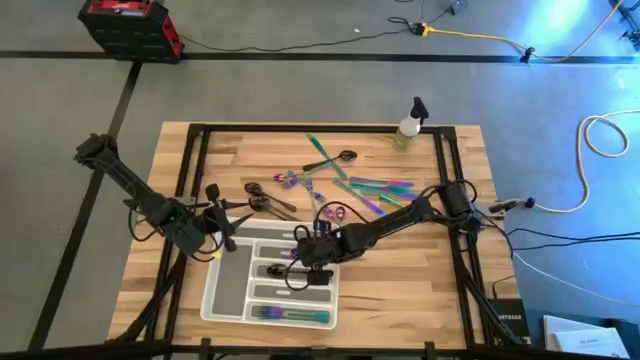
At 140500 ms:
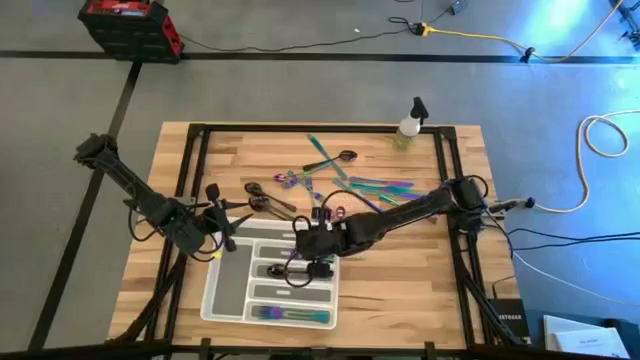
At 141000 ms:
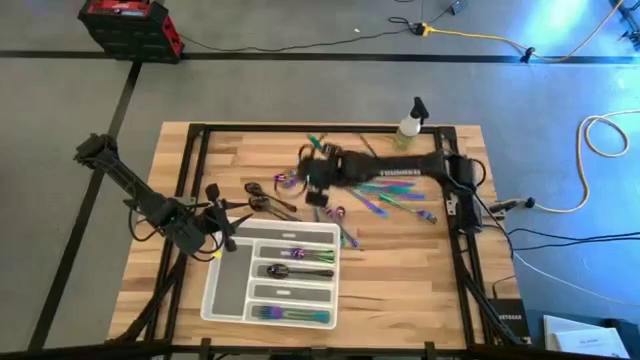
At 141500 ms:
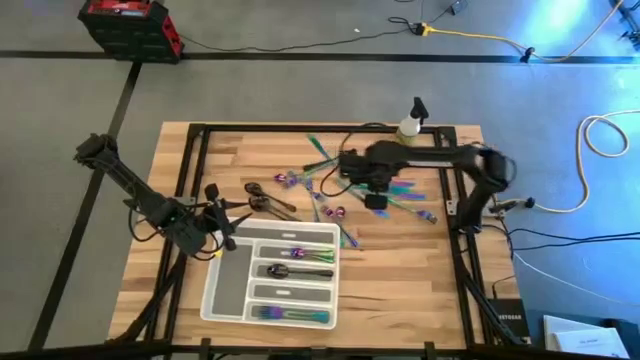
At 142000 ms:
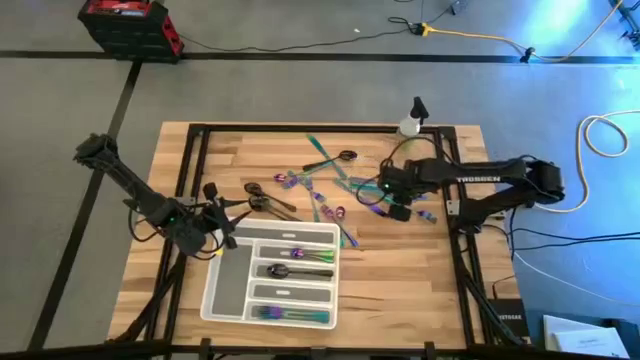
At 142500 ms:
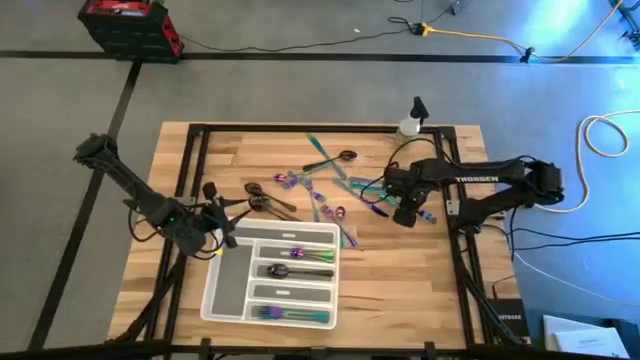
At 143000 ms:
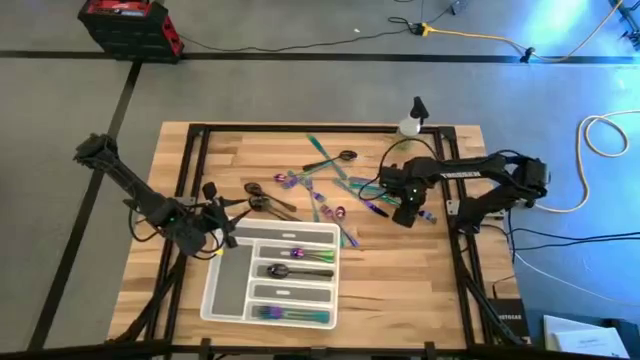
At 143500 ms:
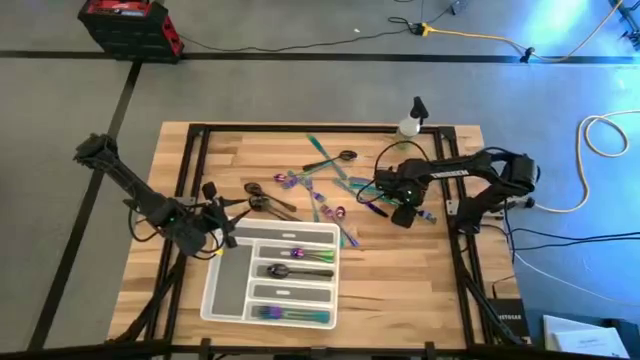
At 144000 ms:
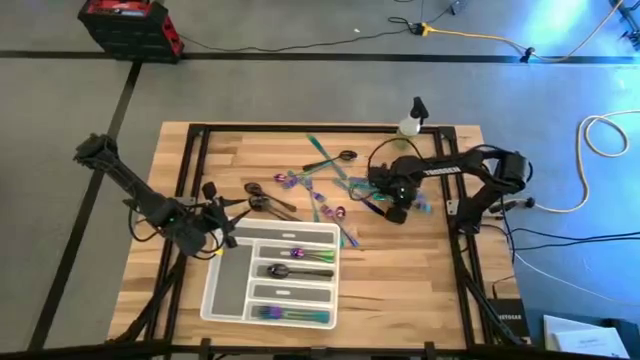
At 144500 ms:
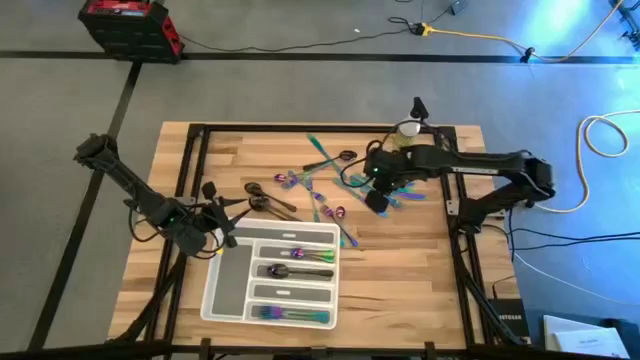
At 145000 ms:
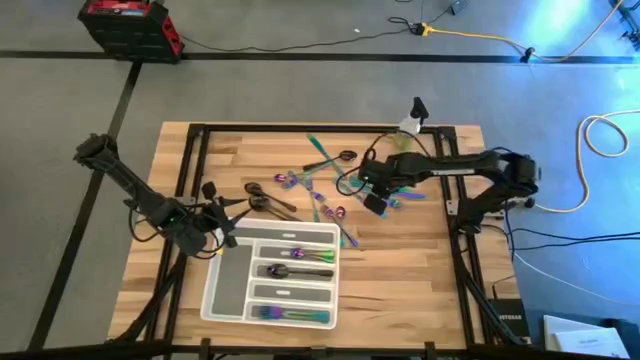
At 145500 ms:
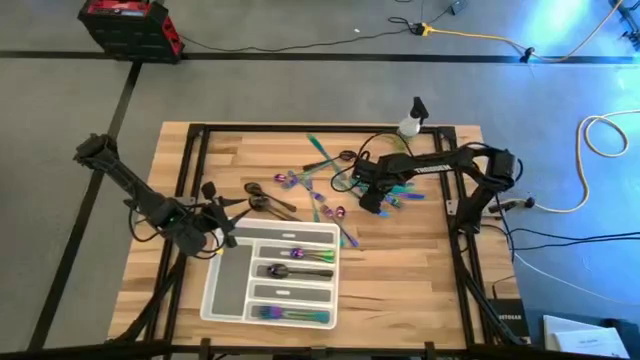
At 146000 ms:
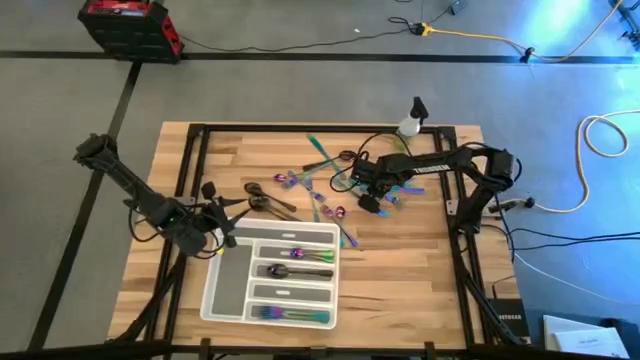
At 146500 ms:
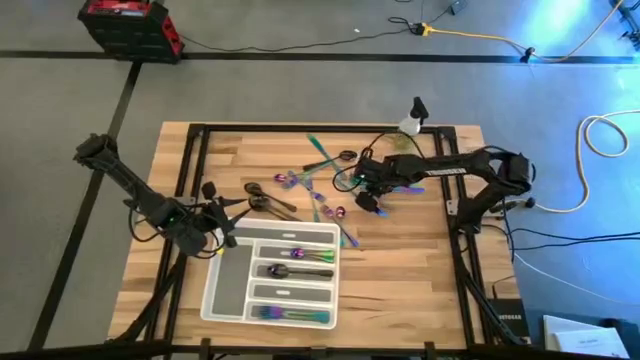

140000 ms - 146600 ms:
Task: Sort silverware
Put the blue fork into the white silverware tray

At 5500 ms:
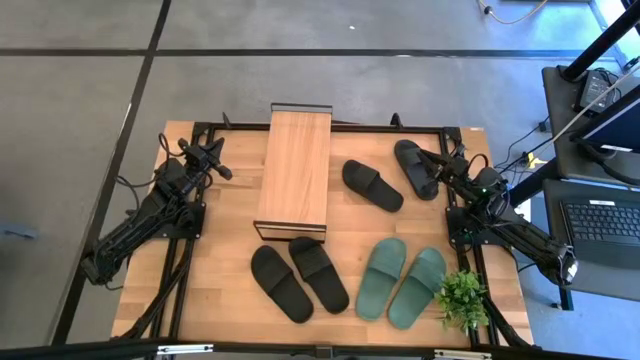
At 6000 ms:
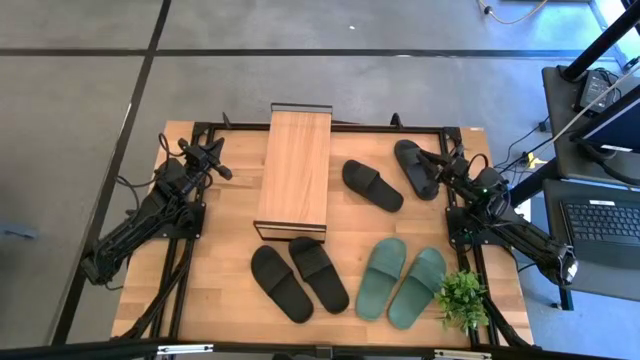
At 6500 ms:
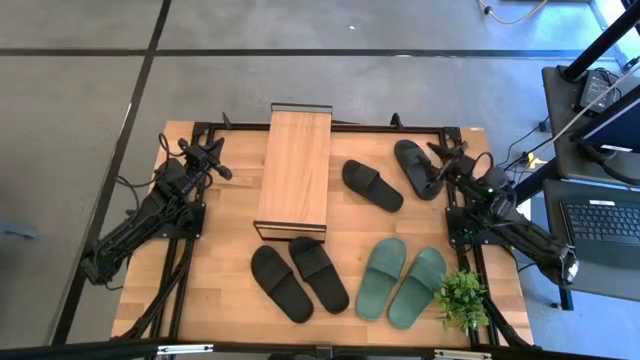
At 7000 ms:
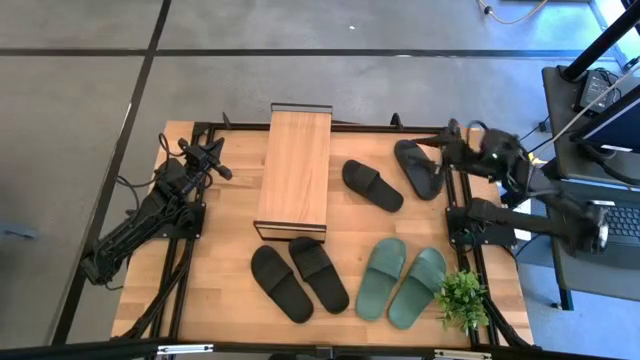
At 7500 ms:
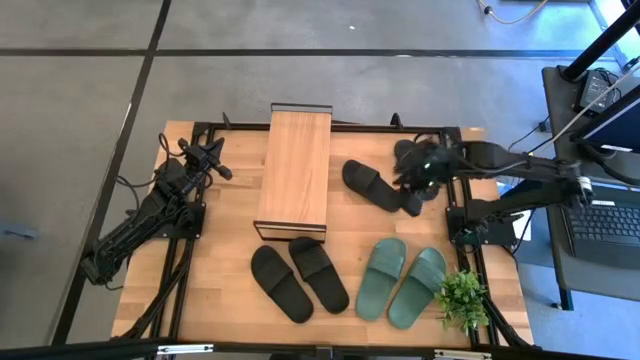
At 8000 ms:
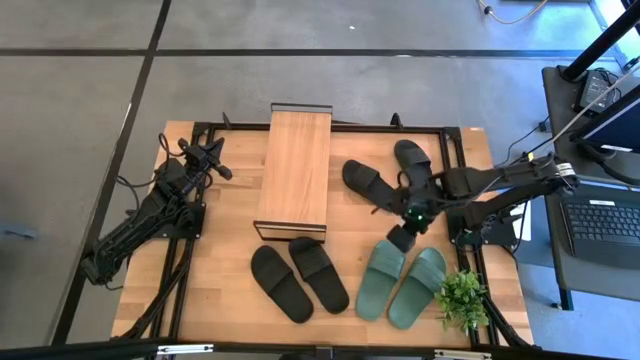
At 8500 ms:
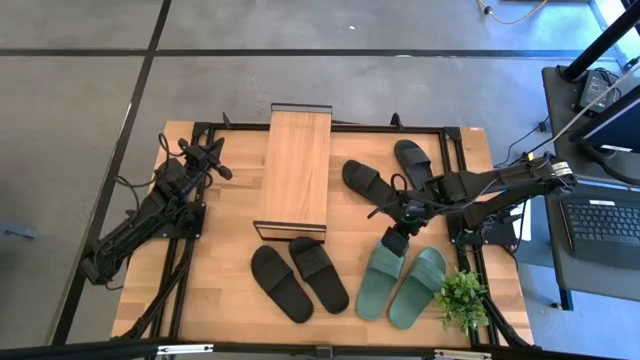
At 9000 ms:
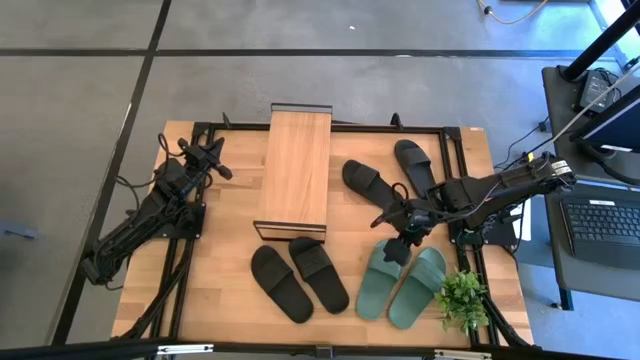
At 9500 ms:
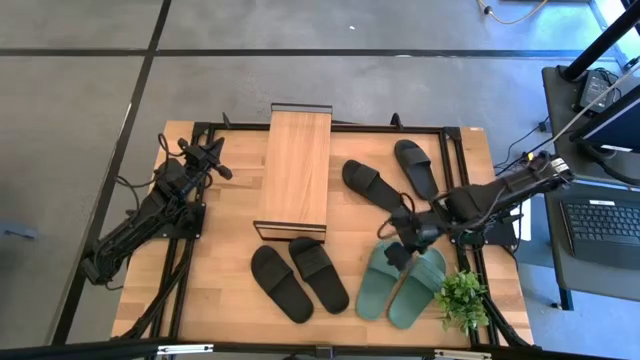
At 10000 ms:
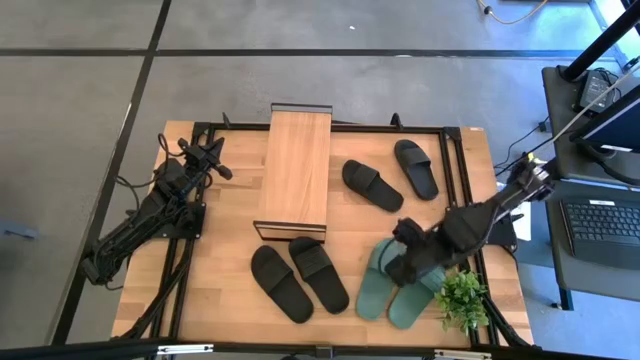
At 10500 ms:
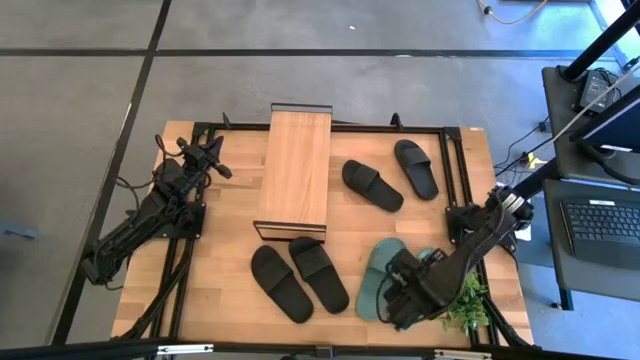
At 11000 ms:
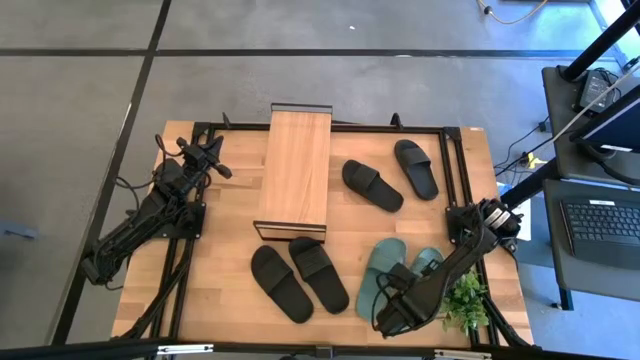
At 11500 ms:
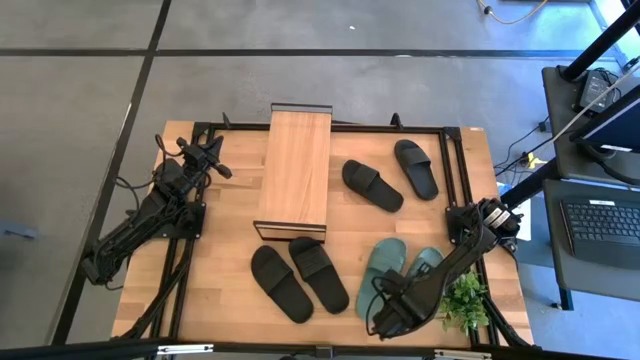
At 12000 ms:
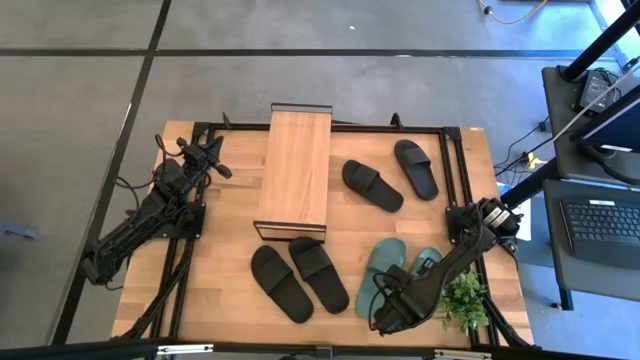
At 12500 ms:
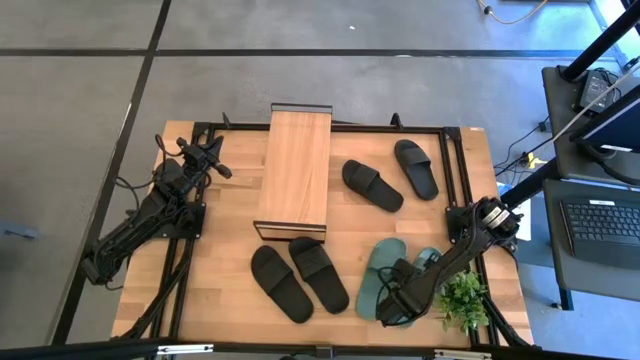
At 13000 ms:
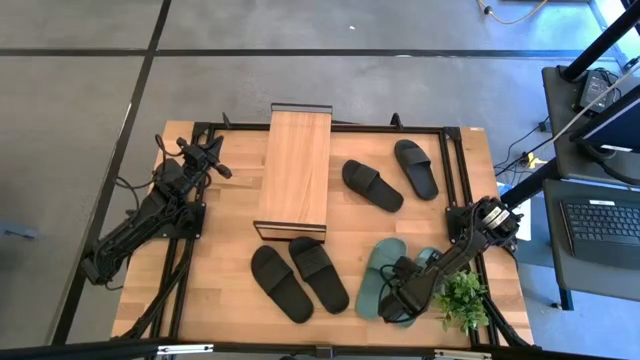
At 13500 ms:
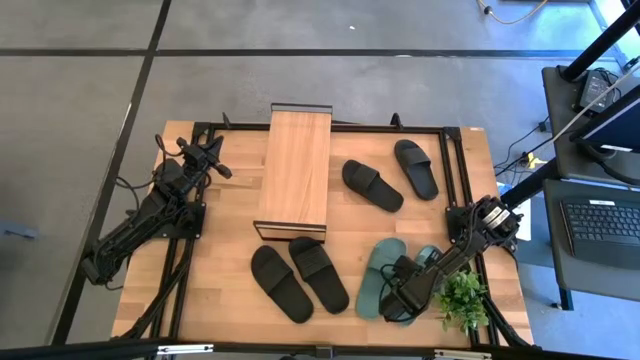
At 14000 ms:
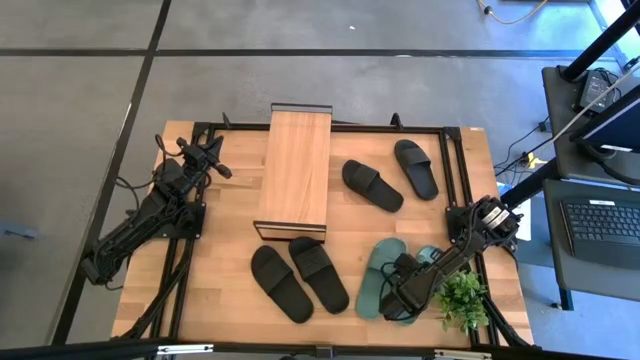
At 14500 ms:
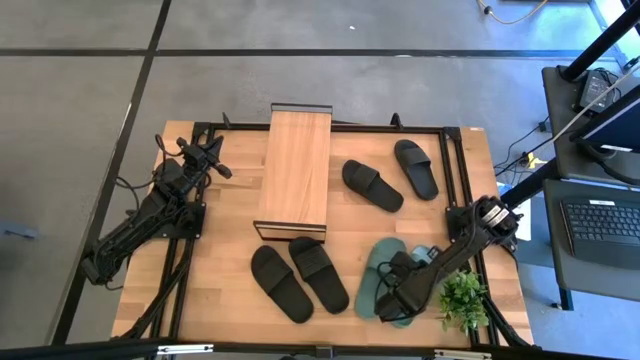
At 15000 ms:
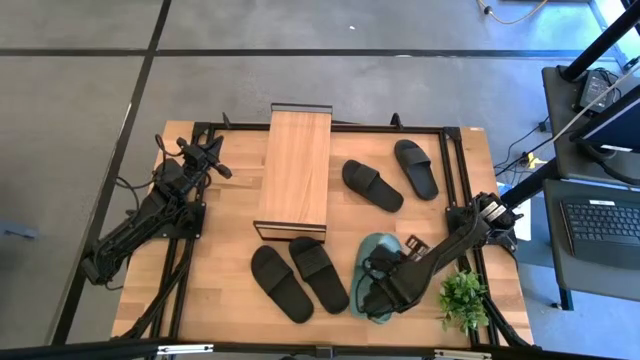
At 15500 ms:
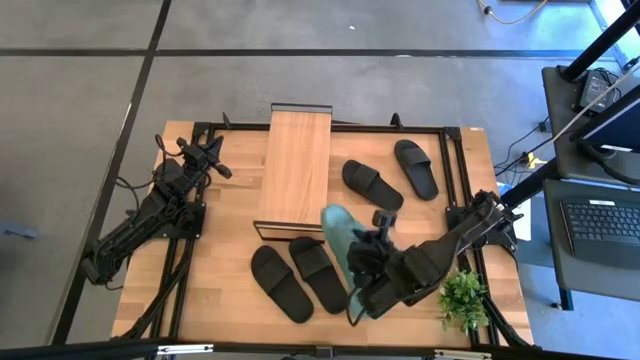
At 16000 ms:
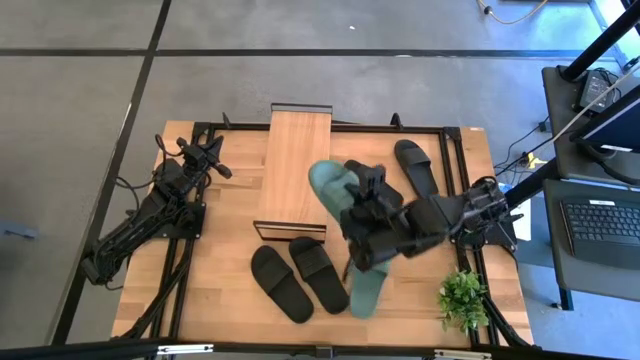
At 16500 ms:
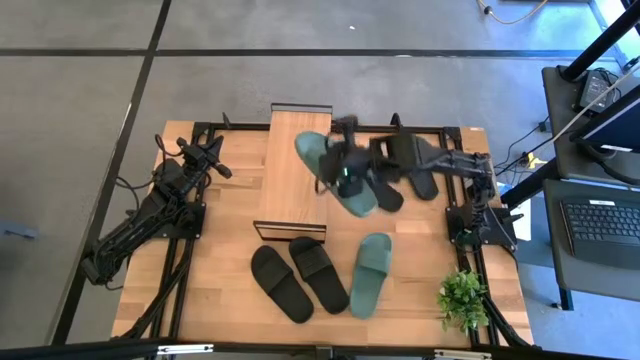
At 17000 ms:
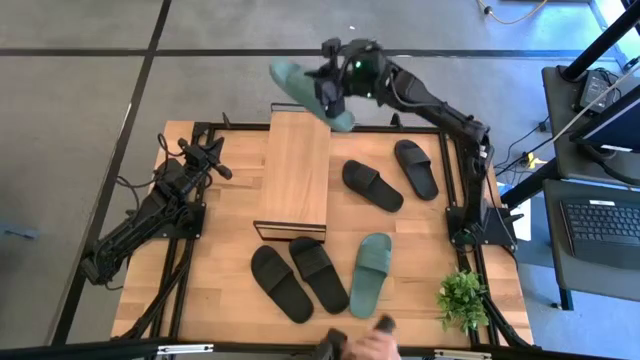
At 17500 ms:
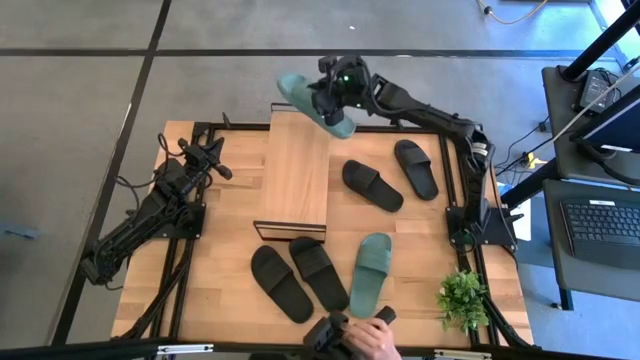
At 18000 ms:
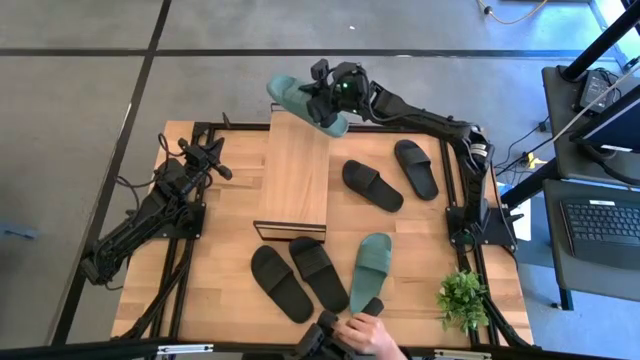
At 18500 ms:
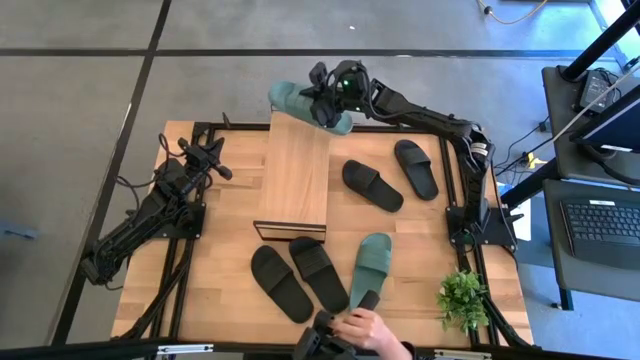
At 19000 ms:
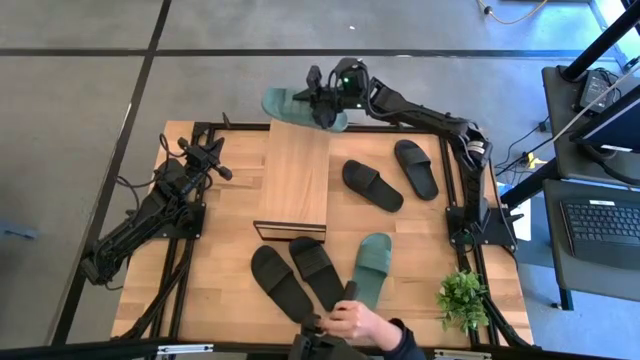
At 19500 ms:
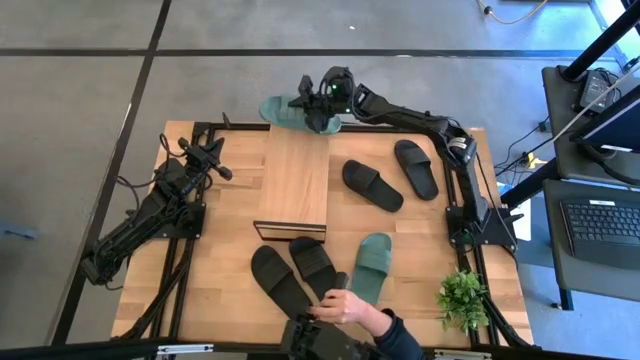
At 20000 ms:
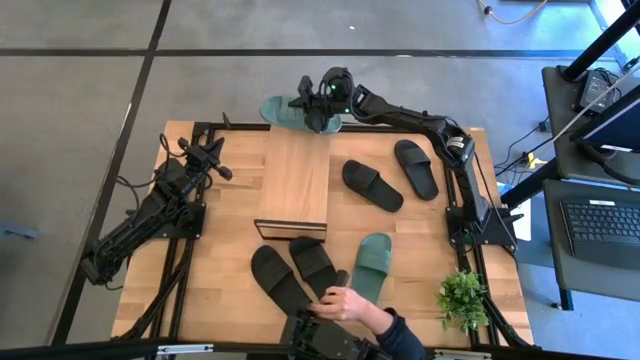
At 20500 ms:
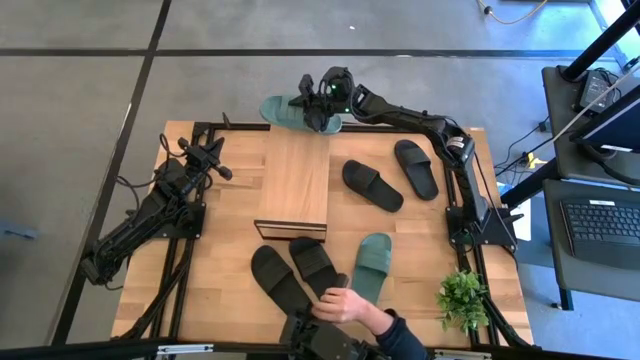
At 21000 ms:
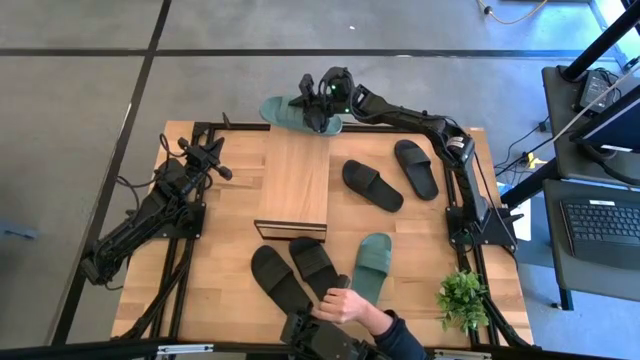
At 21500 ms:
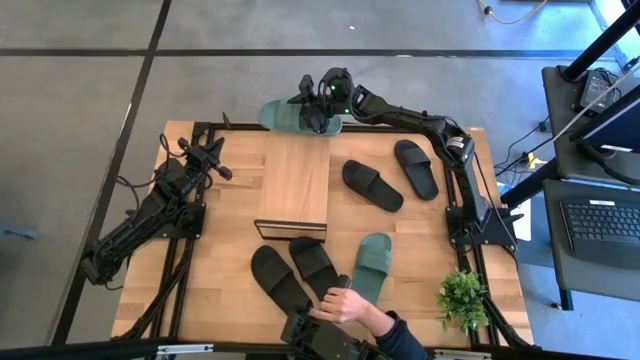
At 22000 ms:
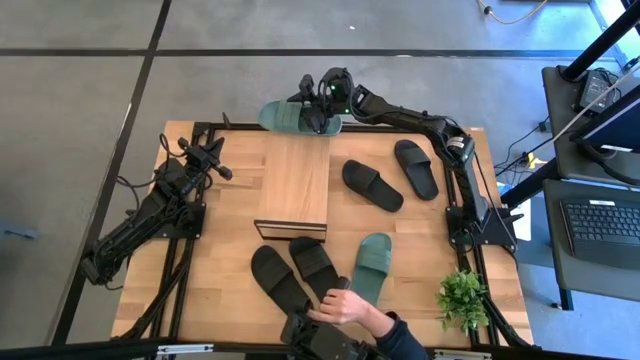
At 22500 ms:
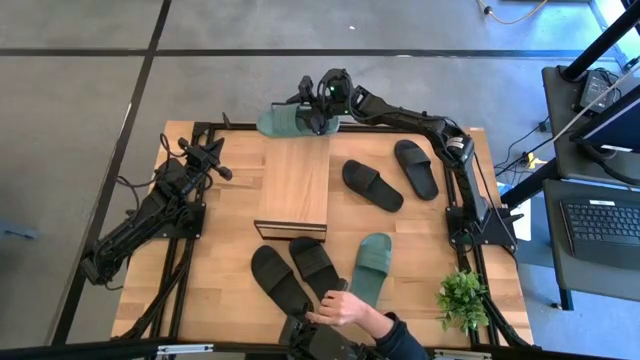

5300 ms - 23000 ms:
Task: Pick and place slides into the shelf
Put the green slide on the shelf
